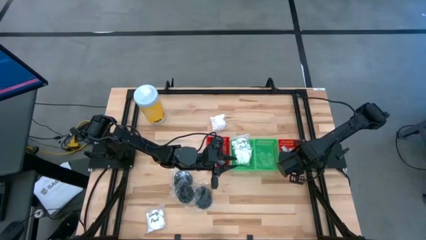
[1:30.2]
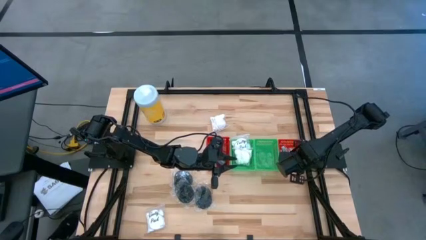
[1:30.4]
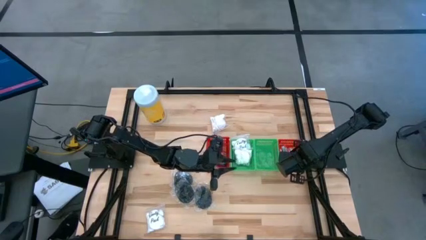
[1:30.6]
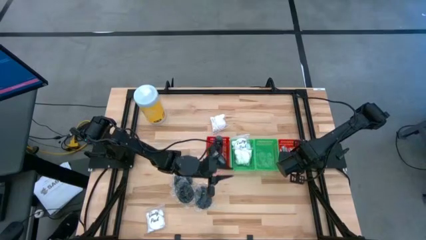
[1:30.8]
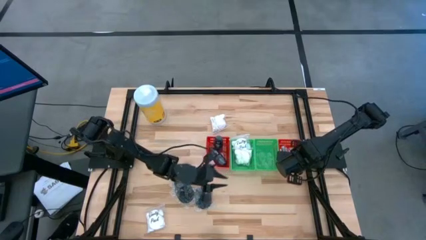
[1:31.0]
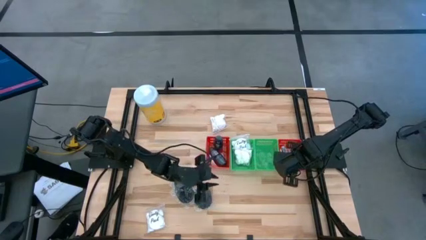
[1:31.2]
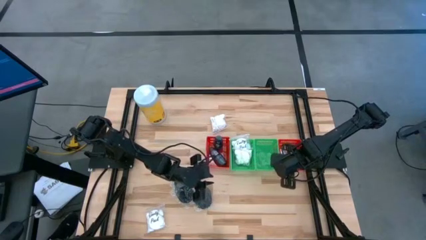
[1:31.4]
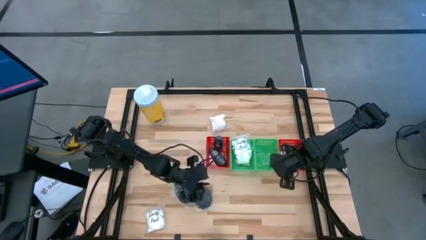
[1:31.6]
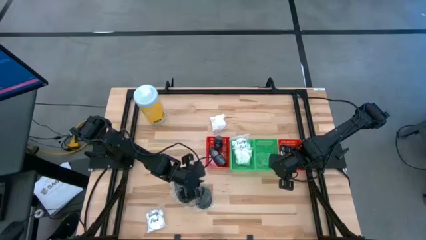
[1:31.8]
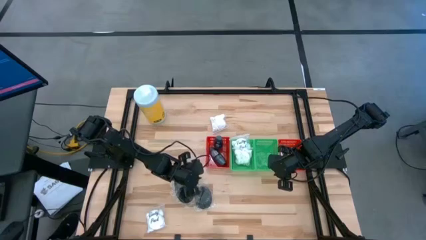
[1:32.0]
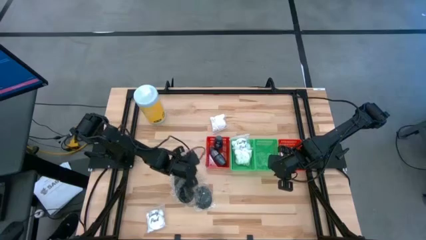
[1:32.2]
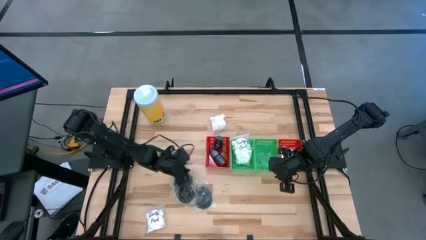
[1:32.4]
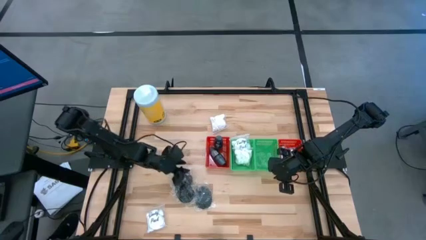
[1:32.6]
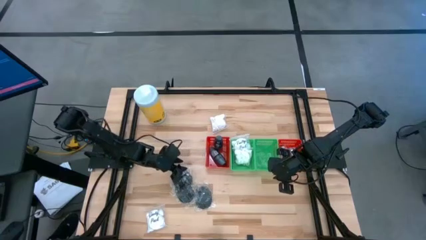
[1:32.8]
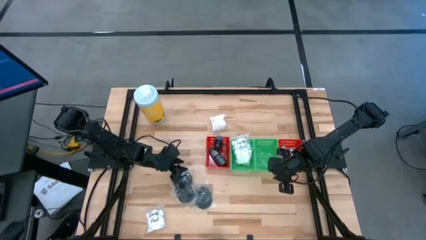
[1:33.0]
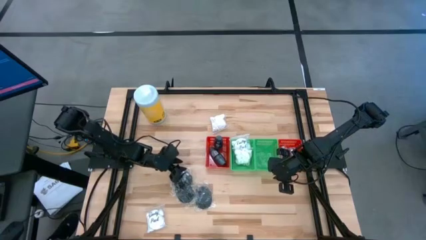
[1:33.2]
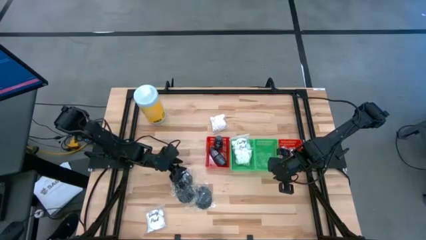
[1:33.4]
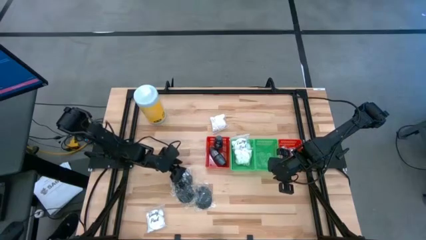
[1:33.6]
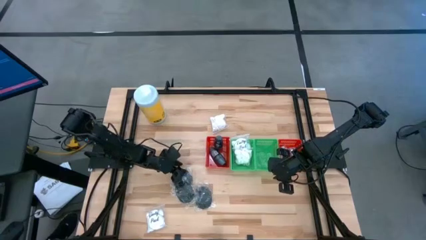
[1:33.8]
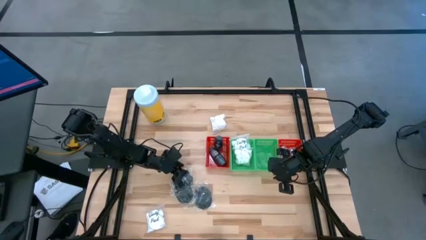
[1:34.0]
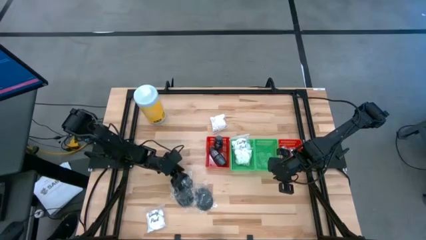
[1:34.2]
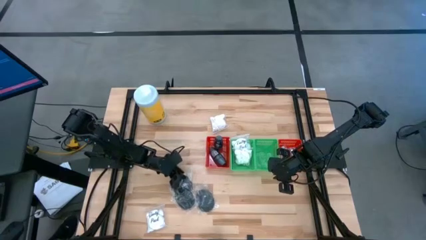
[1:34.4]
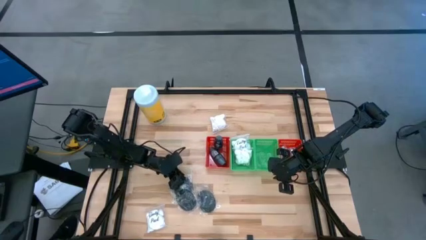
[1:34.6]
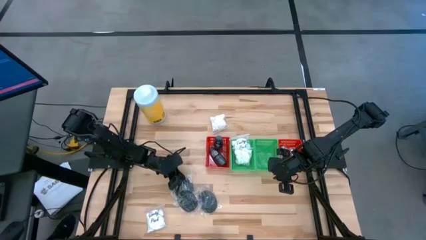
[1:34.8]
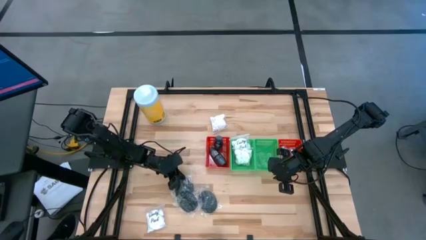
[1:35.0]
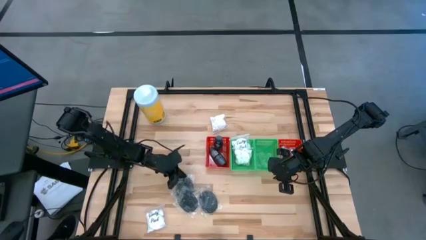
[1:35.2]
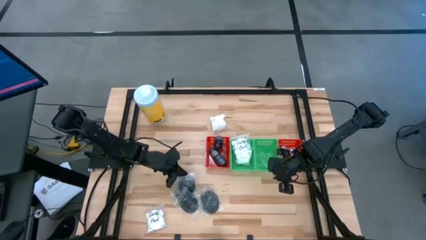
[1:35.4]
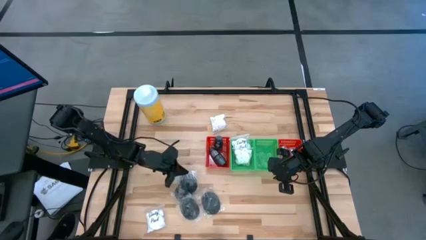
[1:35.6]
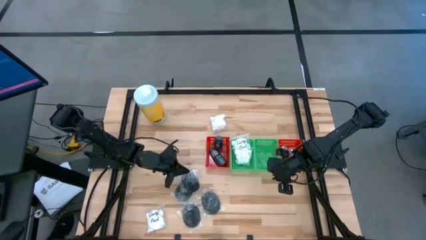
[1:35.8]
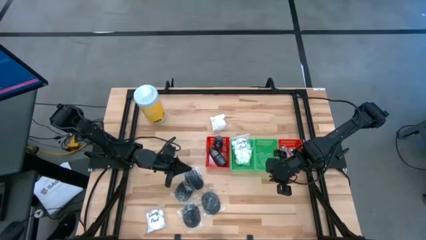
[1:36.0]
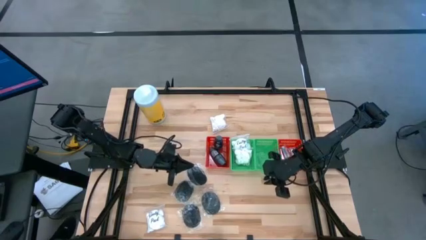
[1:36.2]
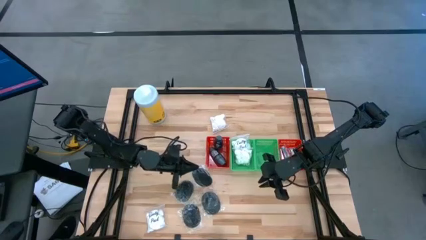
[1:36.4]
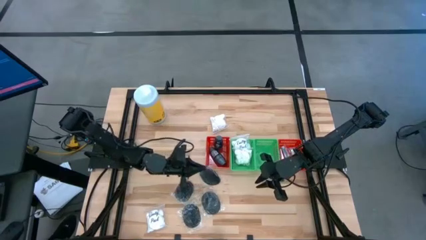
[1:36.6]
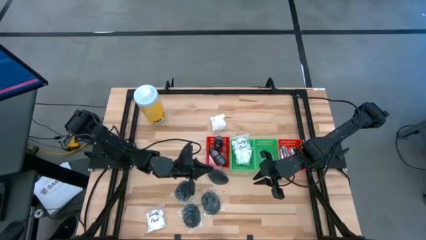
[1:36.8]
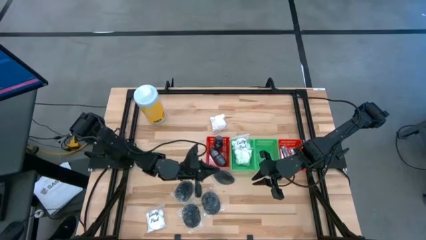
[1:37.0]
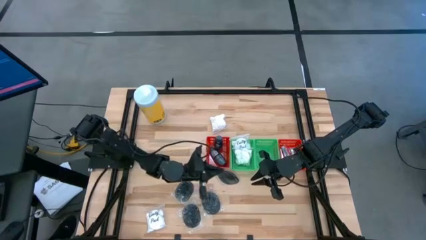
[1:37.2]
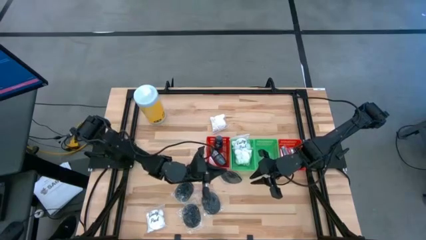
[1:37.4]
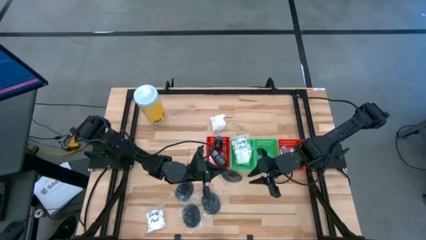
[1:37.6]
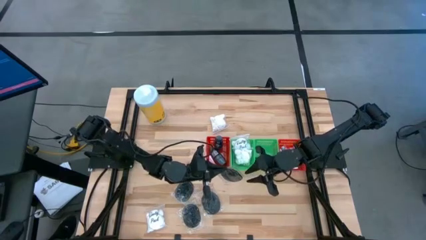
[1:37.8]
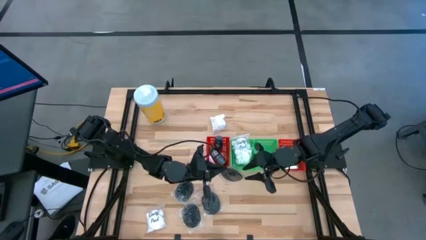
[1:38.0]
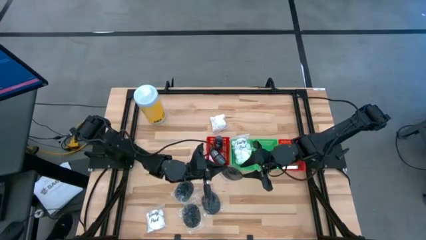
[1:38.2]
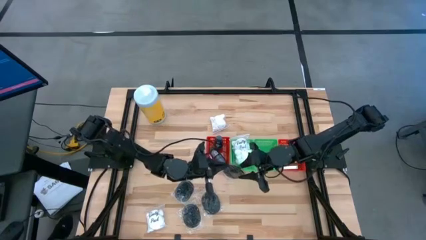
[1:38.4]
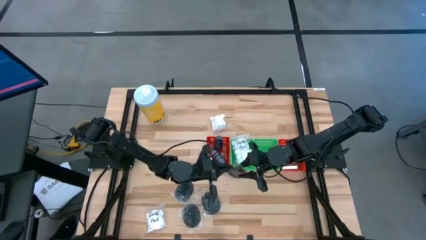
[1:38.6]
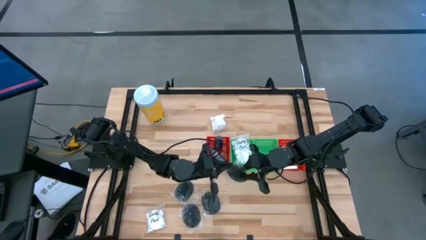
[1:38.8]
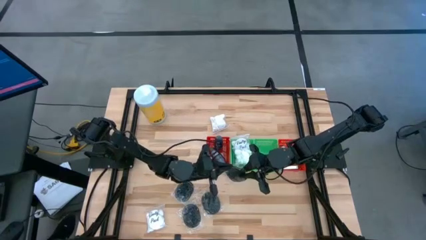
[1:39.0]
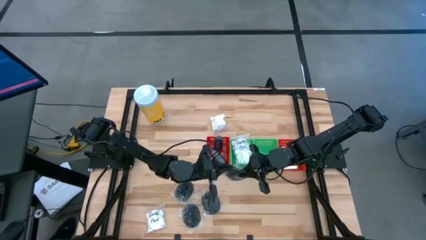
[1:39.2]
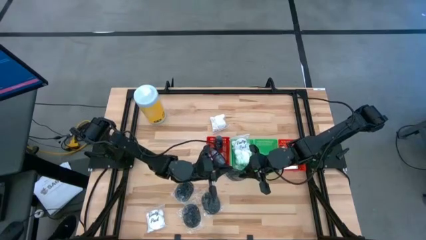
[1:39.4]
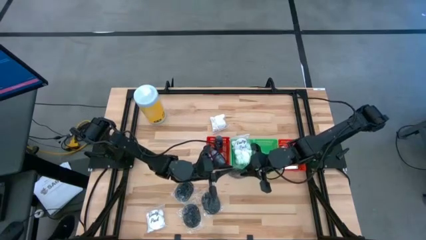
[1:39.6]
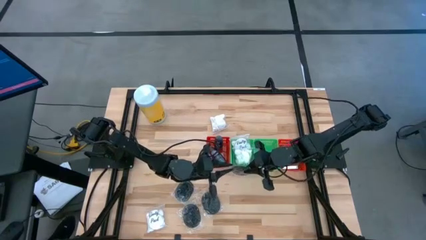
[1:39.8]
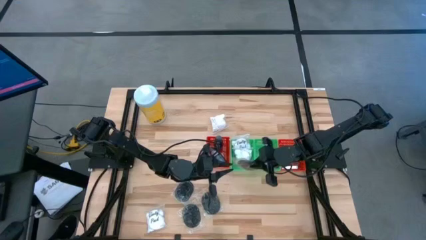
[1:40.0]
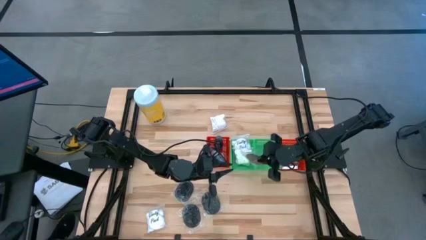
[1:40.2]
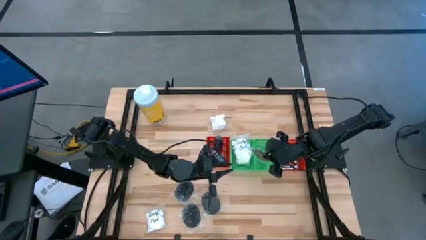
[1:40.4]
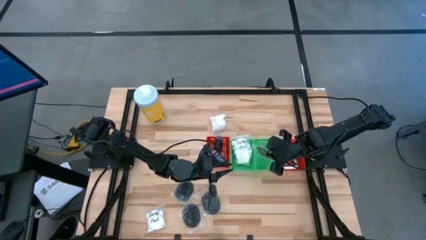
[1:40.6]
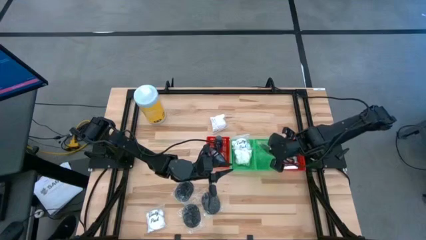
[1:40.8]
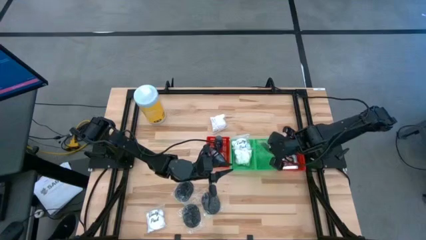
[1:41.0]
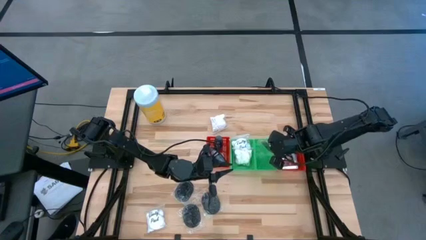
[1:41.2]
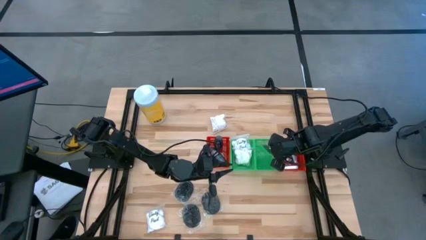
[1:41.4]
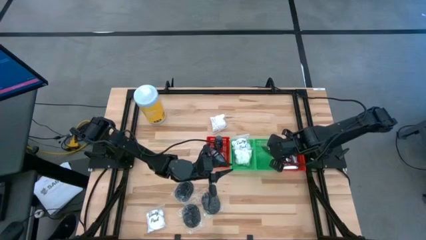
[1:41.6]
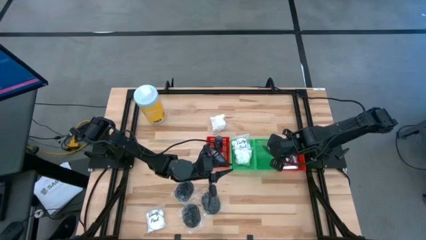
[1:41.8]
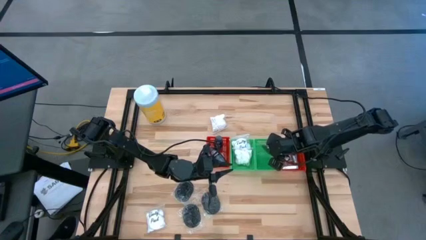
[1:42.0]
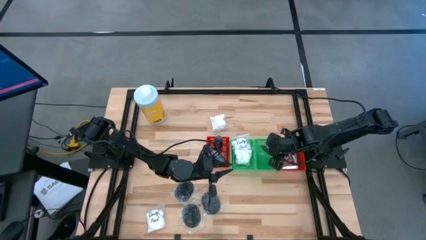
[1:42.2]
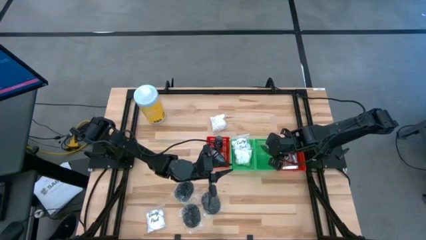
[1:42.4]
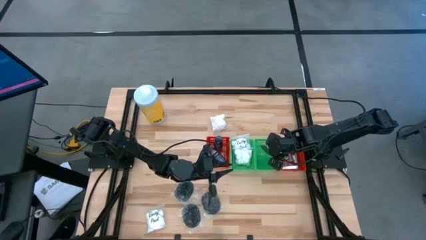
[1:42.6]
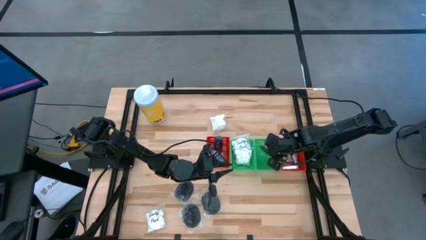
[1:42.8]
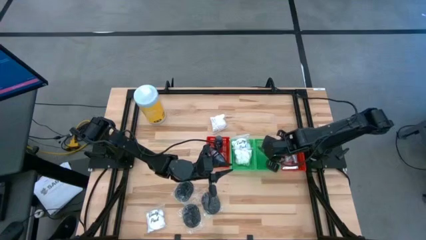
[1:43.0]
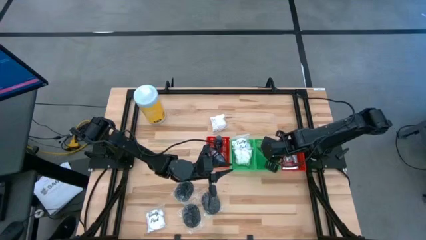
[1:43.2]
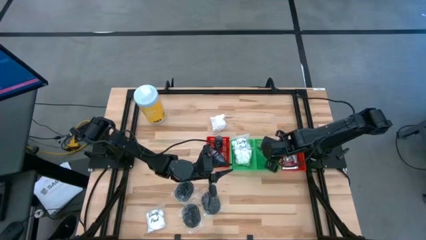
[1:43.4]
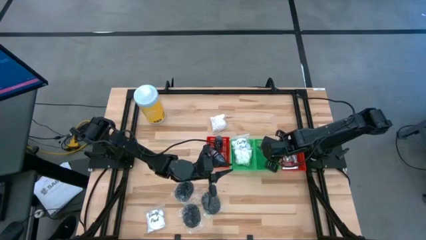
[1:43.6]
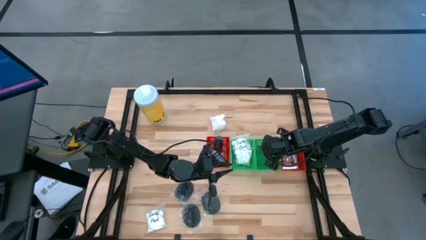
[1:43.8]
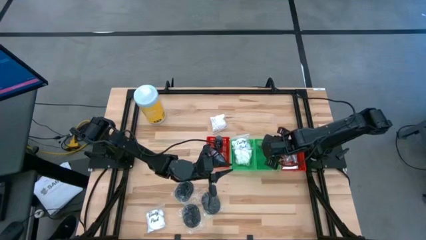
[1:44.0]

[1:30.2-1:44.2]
Task: Pick & Place Travel size toiletries
Put the black hairbrush into the right green bin

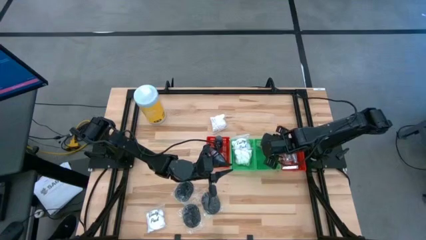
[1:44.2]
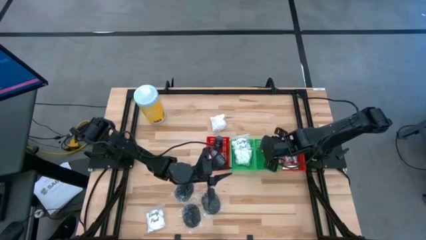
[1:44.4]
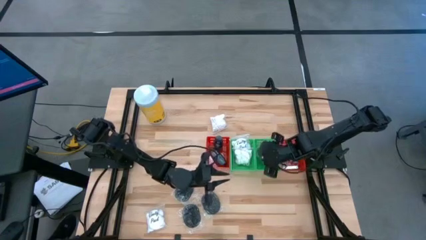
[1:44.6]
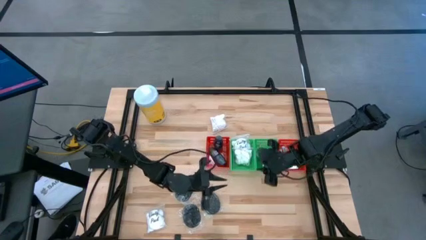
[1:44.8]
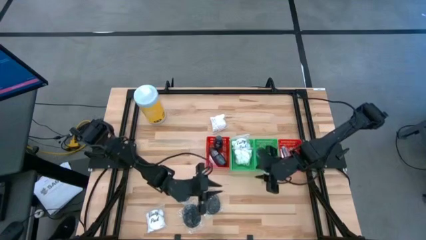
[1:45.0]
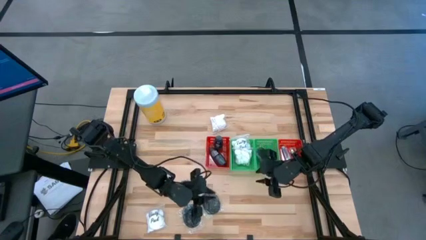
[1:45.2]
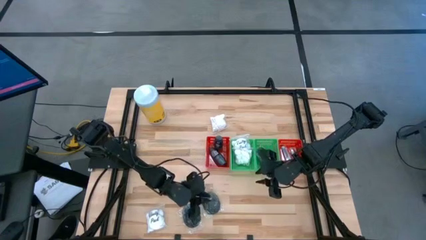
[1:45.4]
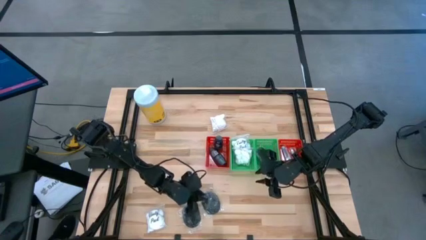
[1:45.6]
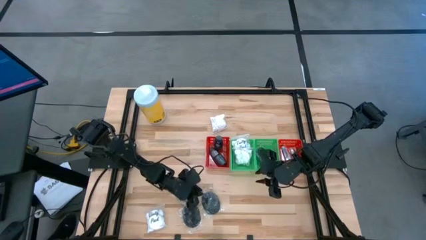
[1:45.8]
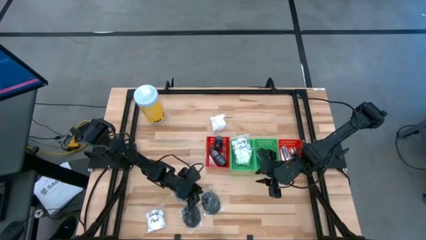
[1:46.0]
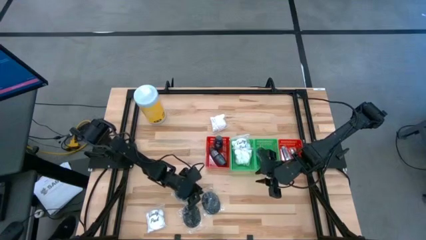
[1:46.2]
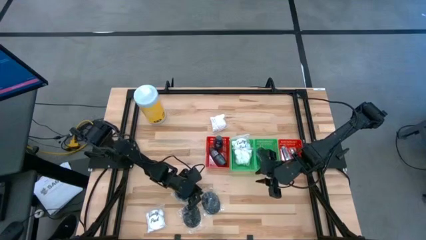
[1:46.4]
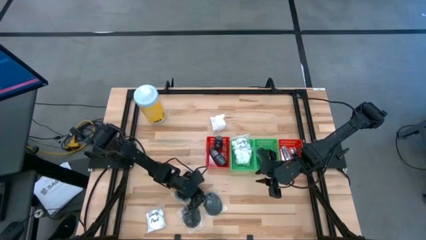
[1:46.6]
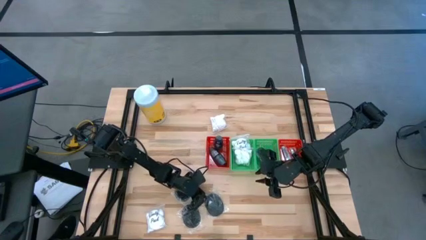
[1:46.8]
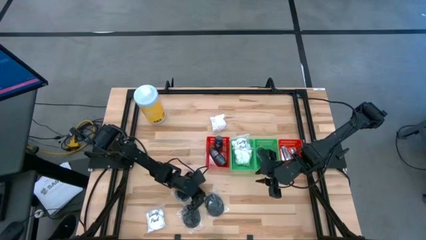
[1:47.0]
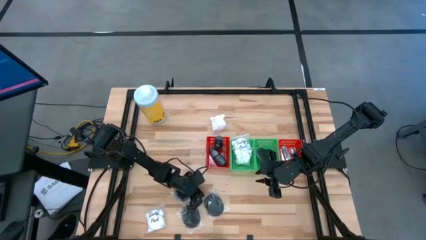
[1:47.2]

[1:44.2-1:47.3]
Put the black hairbrush into the right green bin
